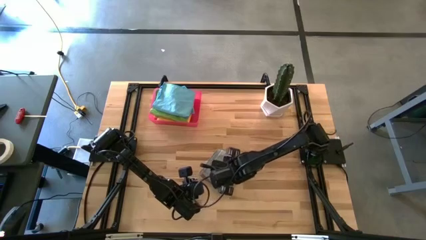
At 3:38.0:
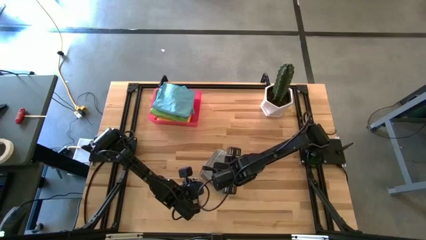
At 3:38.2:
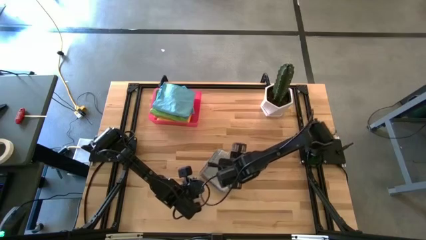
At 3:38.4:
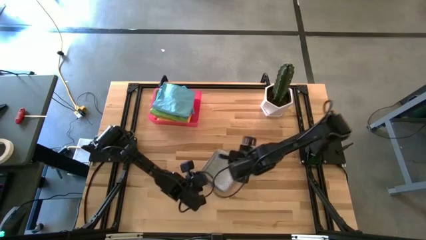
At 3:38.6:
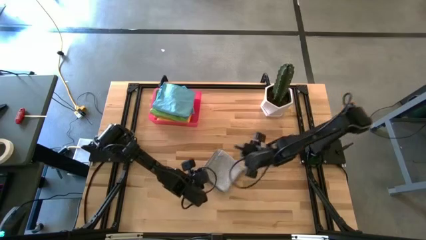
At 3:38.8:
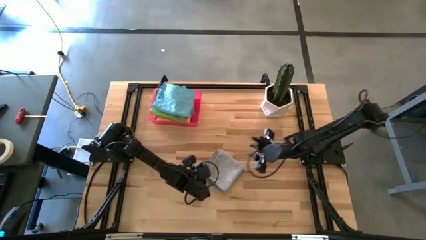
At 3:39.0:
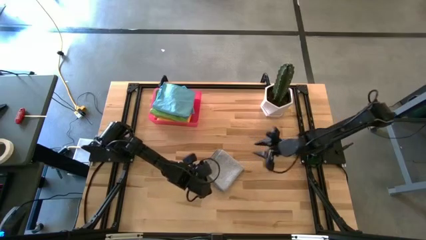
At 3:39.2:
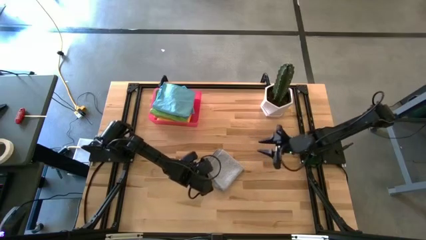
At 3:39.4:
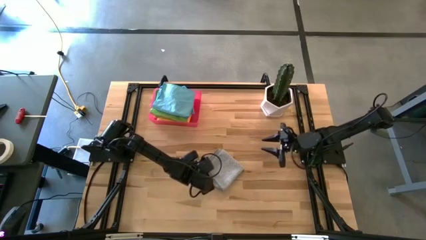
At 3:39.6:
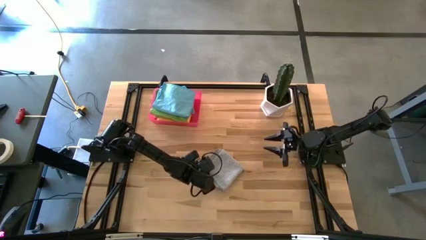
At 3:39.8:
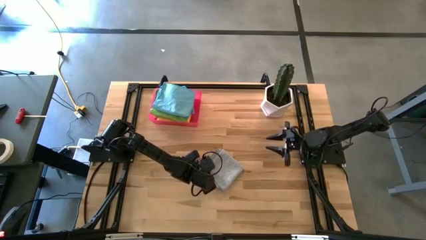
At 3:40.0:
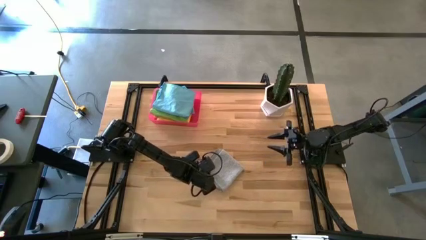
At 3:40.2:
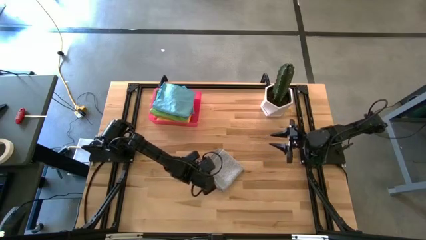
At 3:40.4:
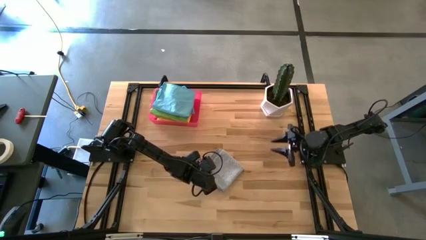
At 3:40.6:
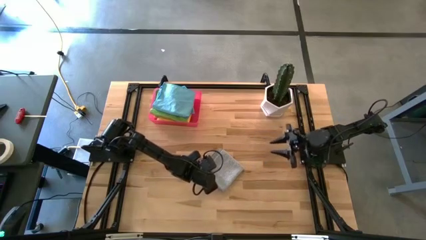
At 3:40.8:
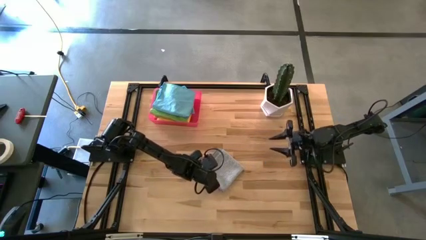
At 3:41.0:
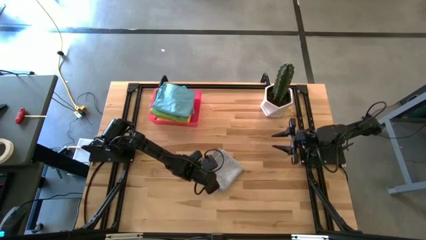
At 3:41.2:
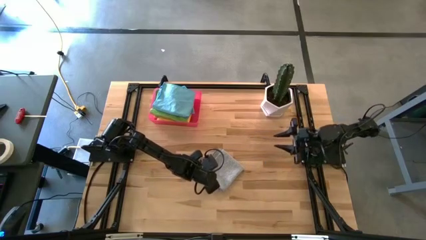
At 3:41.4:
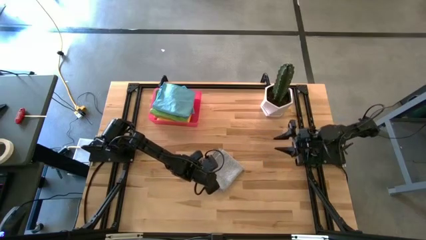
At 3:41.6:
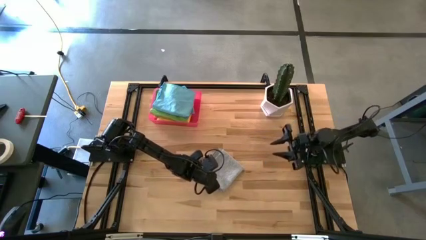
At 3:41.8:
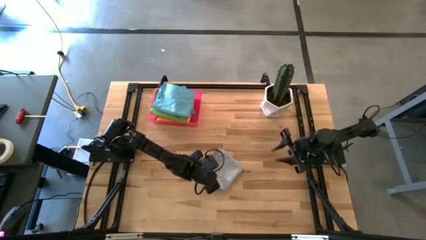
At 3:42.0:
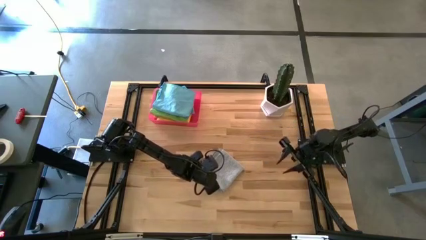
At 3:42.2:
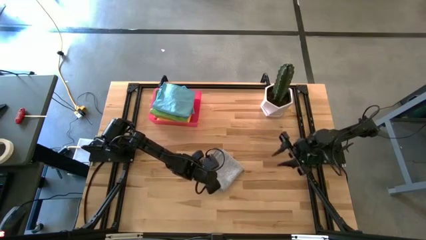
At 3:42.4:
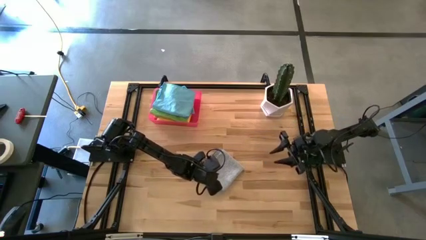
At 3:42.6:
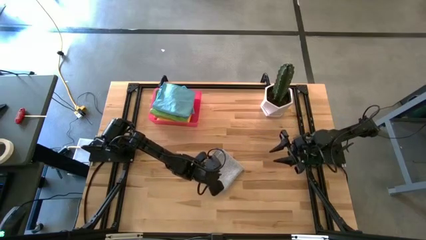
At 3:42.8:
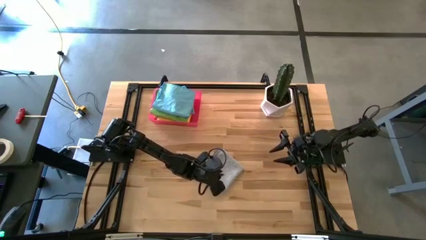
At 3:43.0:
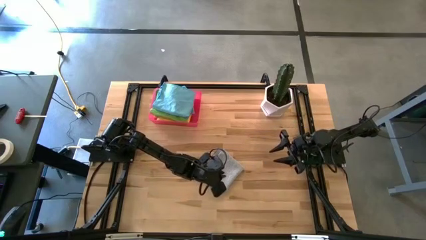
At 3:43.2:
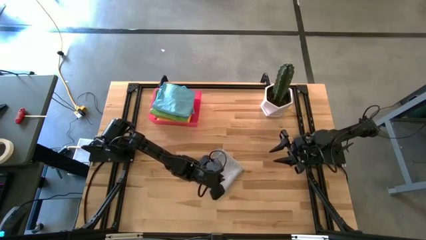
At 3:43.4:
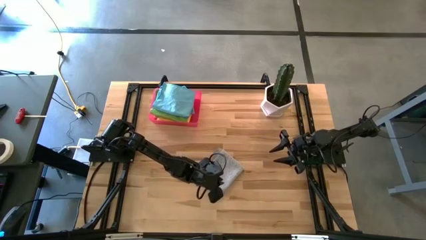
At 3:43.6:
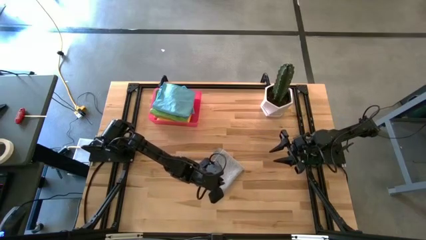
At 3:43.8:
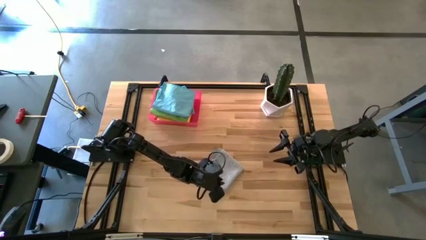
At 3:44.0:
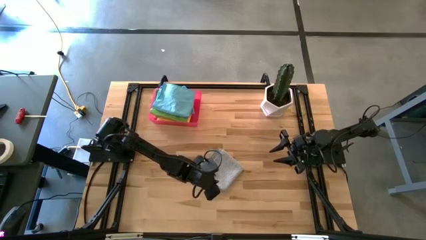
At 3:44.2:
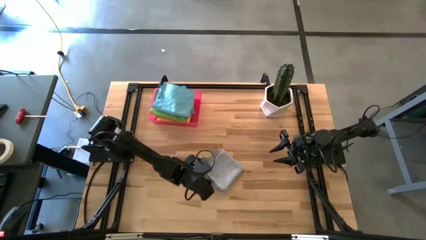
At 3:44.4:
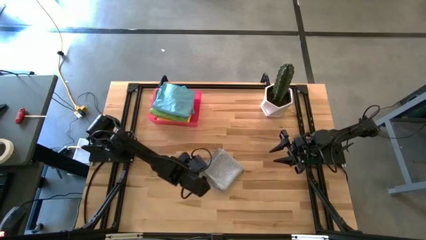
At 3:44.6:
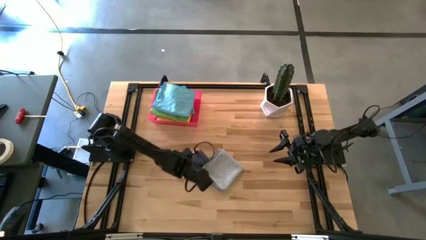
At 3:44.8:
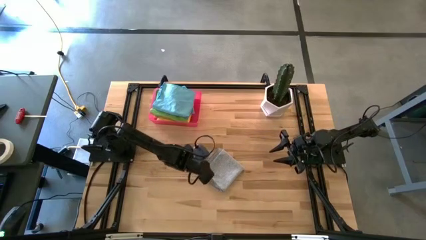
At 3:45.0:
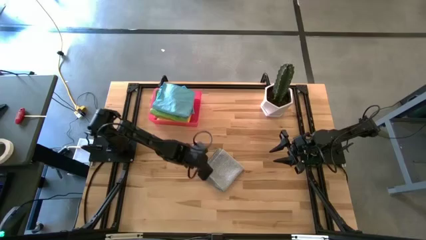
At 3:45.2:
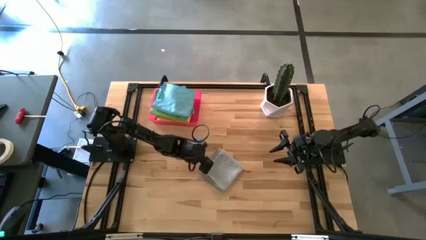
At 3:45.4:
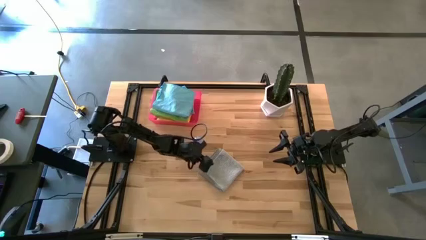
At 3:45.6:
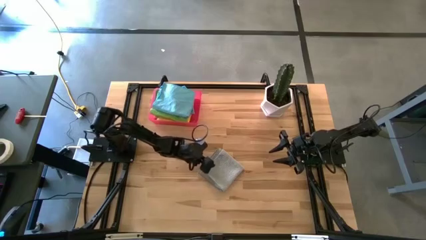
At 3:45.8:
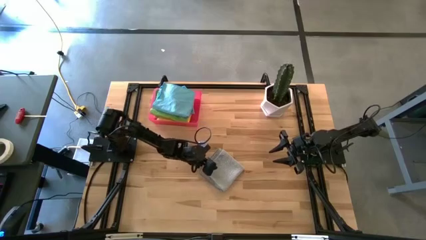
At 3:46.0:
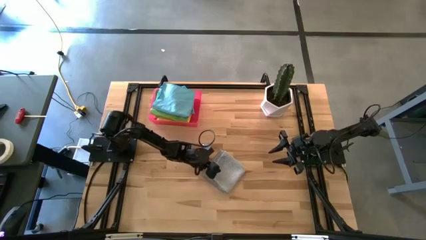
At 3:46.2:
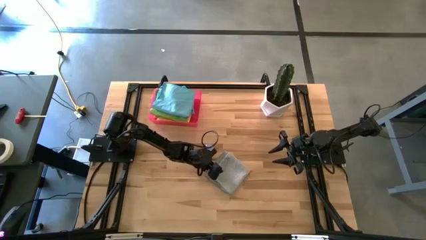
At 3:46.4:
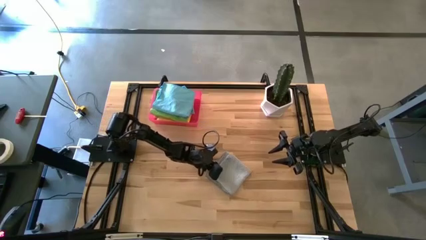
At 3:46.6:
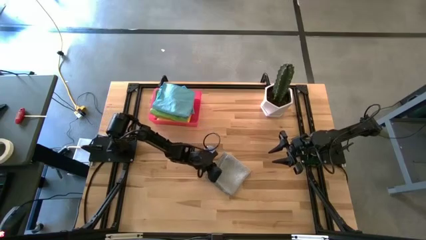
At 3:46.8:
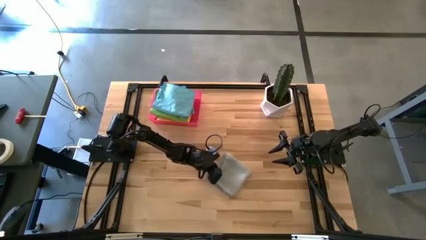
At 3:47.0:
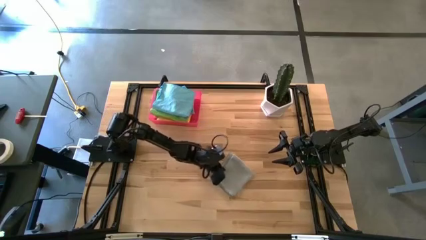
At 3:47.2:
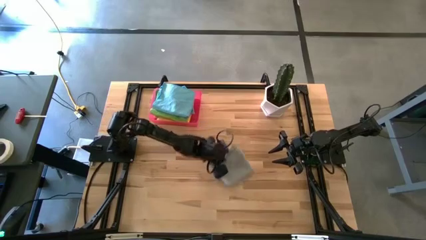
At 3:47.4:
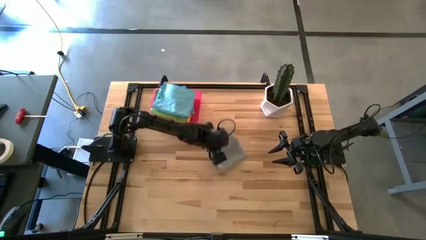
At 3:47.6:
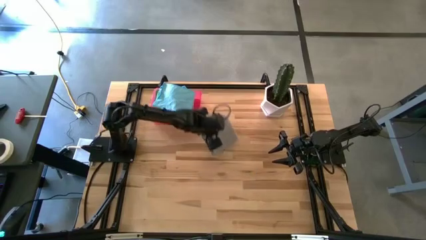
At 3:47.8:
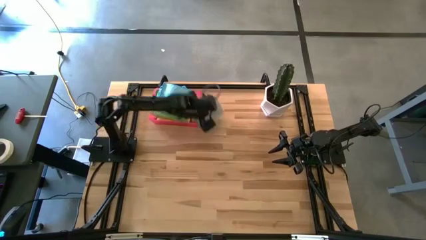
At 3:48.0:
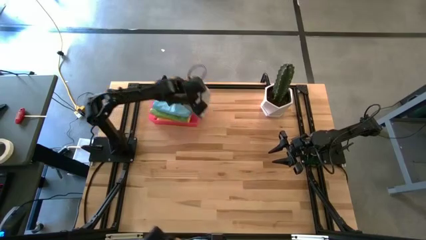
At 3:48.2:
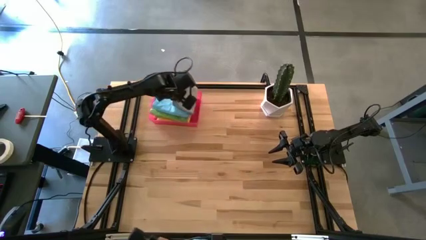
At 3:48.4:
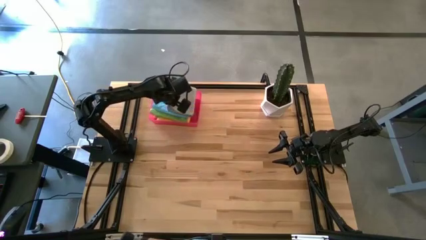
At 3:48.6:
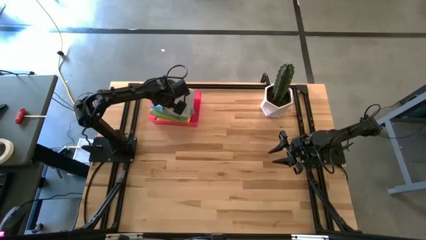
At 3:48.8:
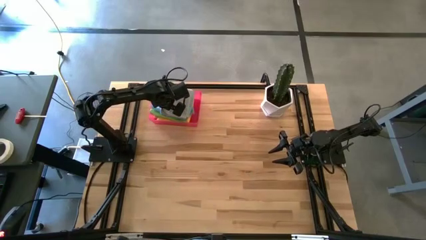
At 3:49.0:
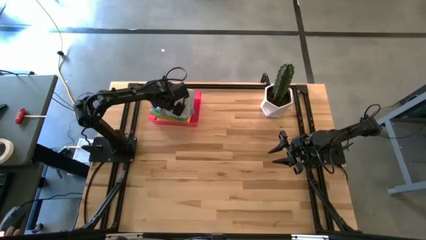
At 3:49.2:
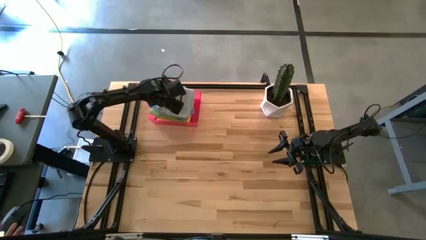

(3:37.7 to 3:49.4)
Task: Fold microfiber towels
Put the gray towel into the bin

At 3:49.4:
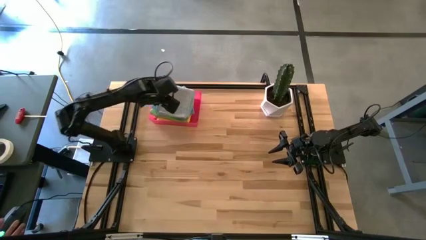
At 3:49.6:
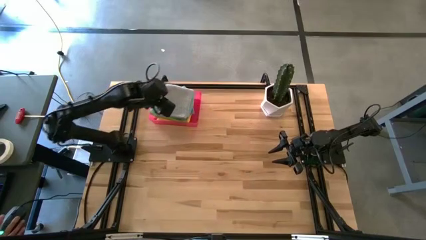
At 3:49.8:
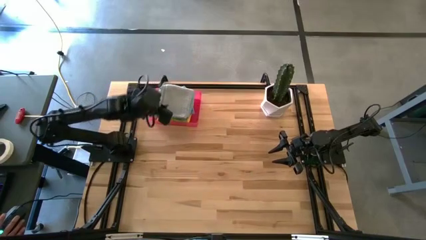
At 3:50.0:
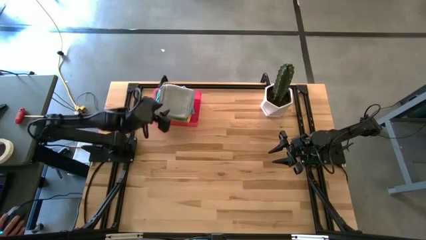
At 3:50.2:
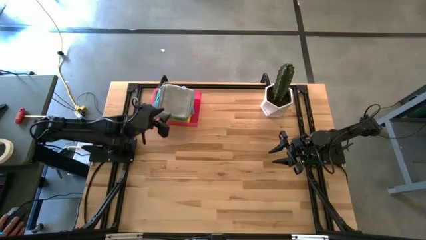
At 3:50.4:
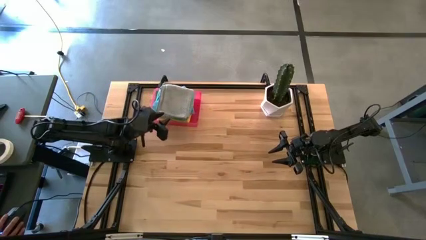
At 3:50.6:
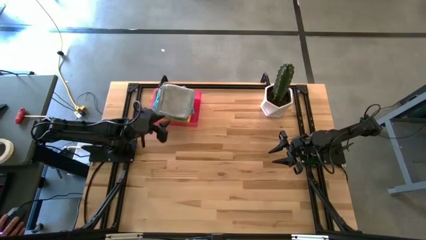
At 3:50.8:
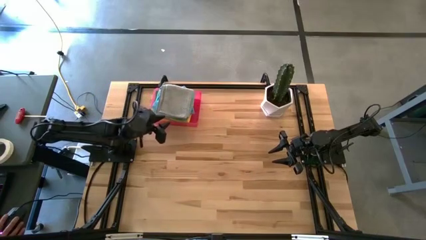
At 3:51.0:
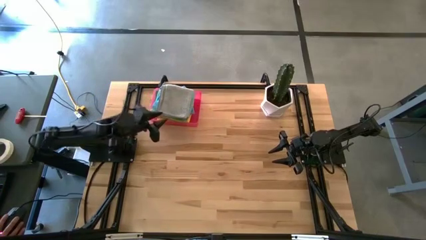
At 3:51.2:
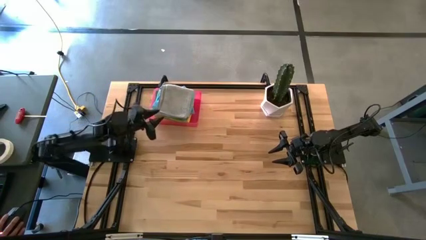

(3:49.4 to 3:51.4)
Return to Home Position

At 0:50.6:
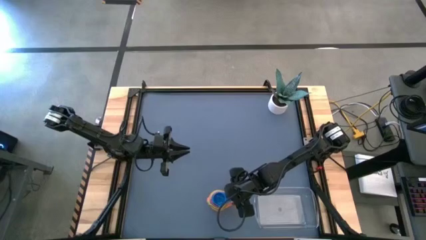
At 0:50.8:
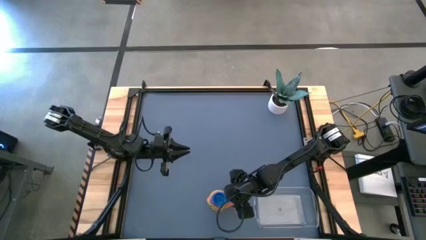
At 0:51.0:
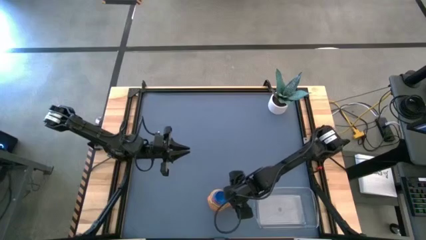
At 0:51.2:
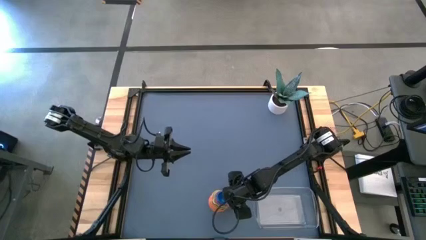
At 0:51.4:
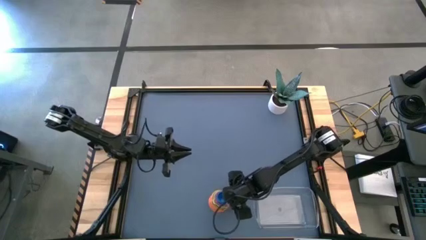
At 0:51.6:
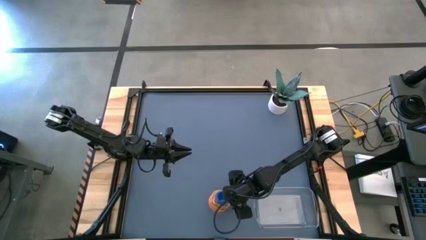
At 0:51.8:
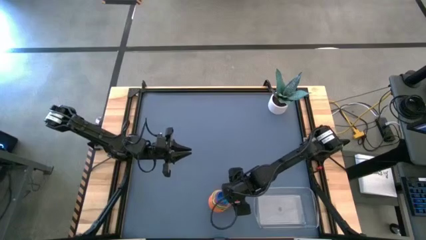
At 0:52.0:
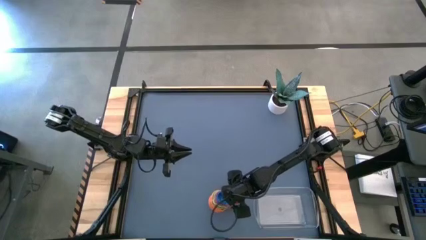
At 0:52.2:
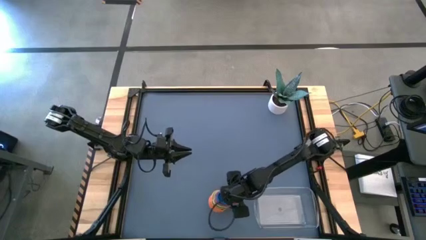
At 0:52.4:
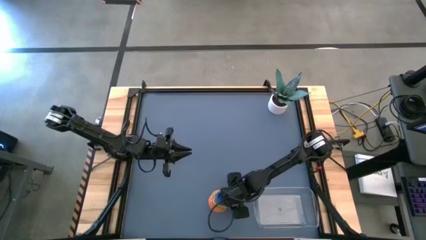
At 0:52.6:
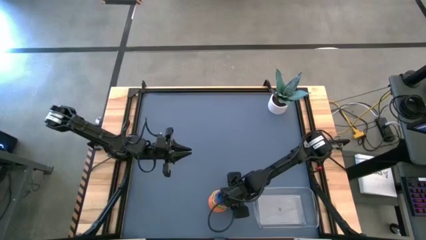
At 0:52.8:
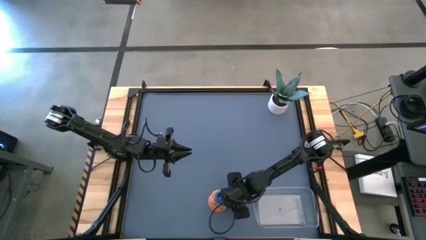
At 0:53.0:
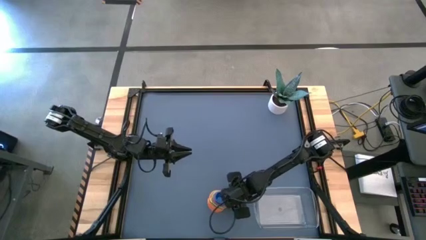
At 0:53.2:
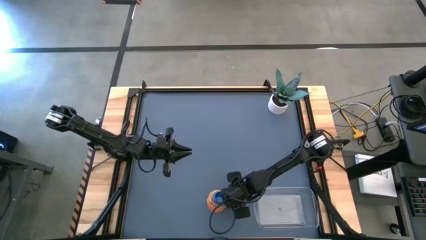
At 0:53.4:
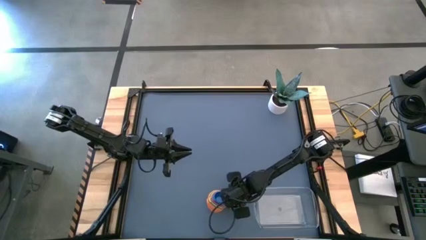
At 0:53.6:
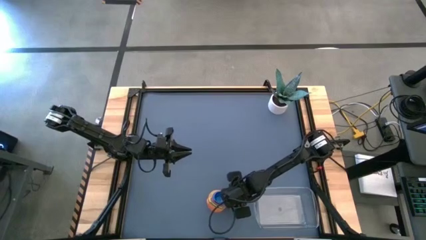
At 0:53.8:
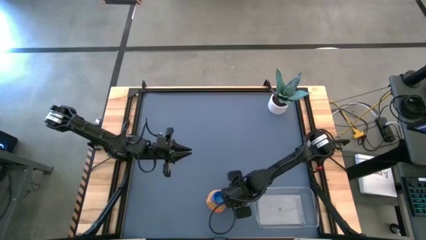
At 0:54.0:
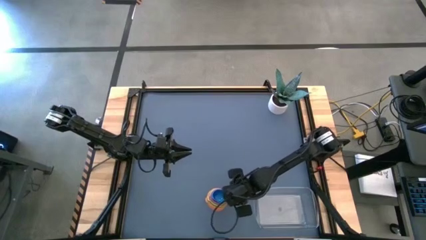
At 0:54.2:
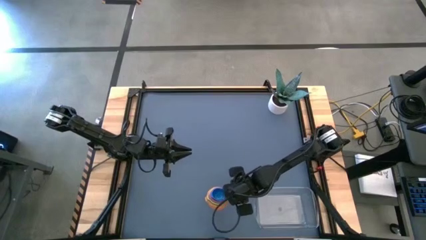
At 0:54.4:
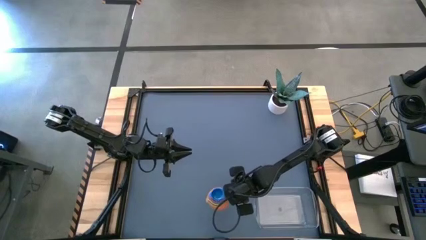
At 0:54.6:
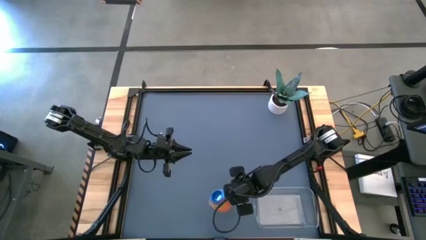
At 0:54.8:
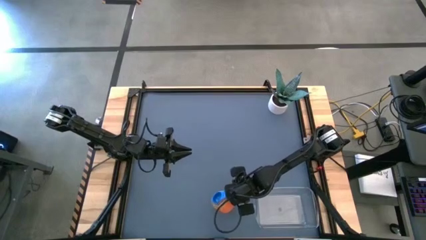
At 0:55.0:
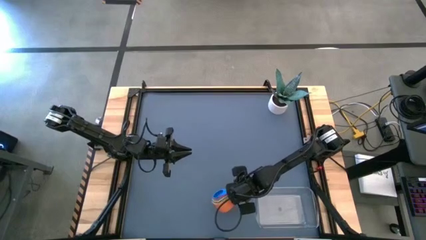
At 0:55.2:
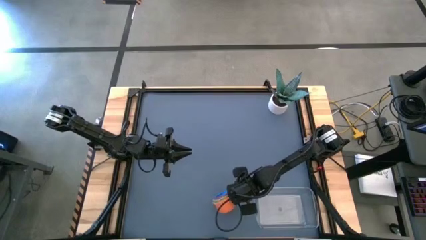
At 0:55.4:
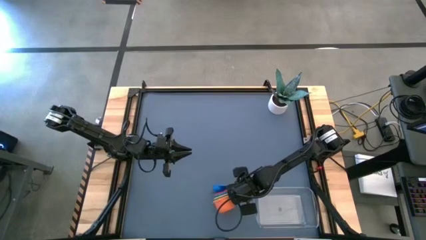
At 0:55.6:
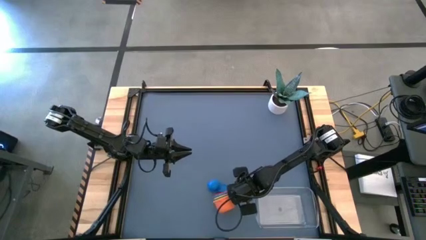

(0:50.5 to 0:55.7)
Task: Nest measuring cups in basket
Put the nested measuring cups into the transparent bin
